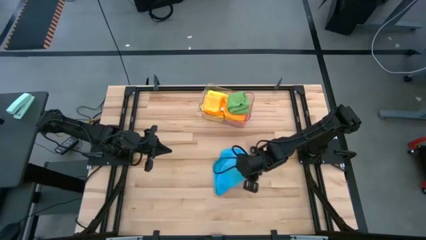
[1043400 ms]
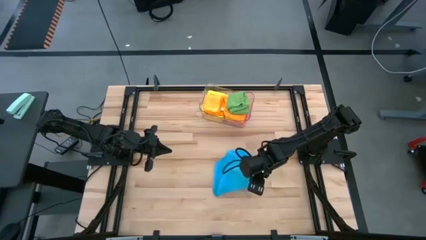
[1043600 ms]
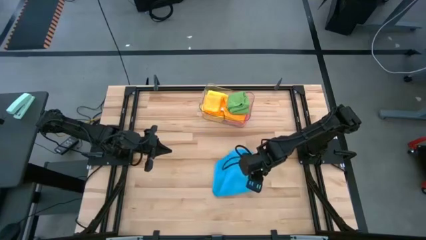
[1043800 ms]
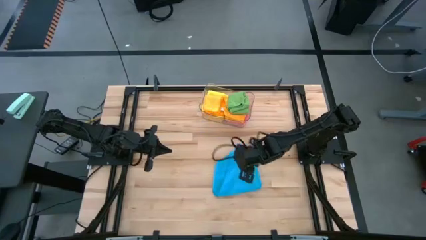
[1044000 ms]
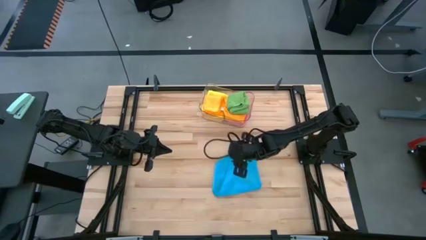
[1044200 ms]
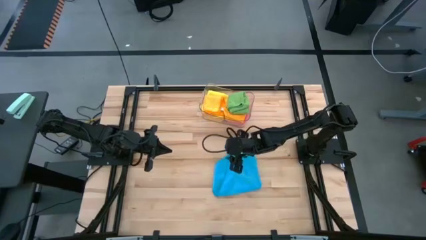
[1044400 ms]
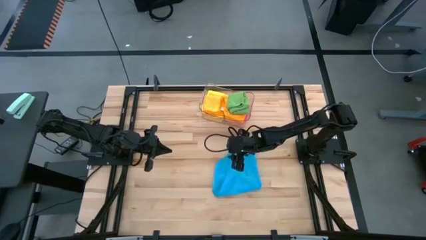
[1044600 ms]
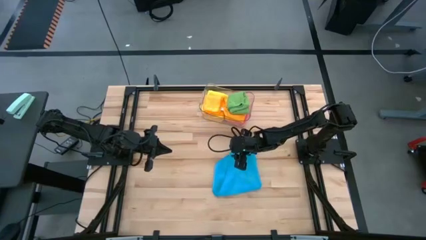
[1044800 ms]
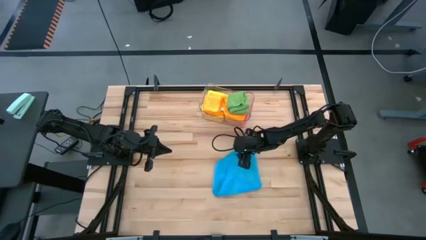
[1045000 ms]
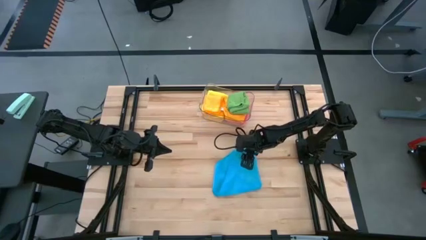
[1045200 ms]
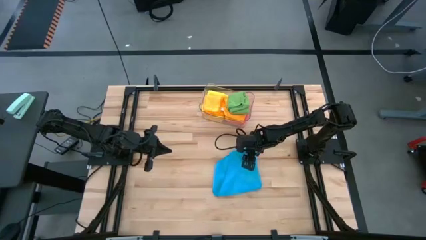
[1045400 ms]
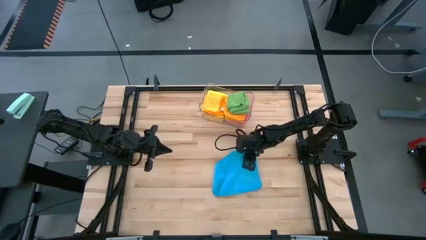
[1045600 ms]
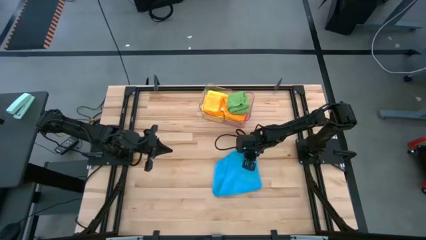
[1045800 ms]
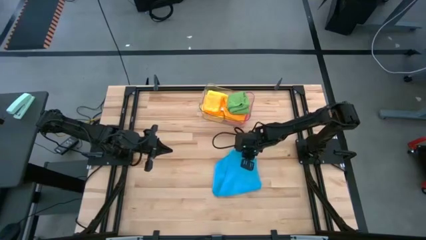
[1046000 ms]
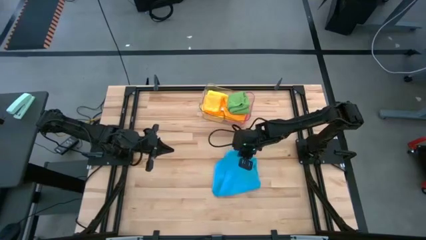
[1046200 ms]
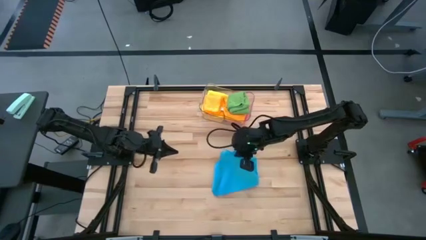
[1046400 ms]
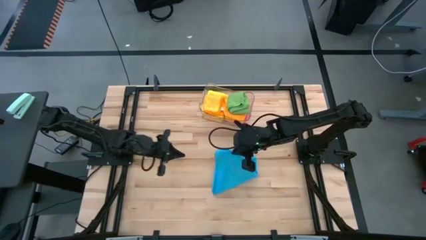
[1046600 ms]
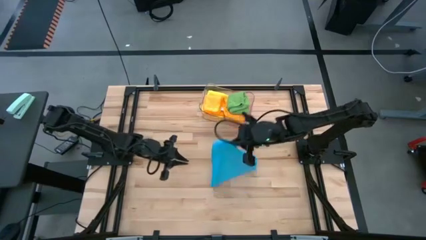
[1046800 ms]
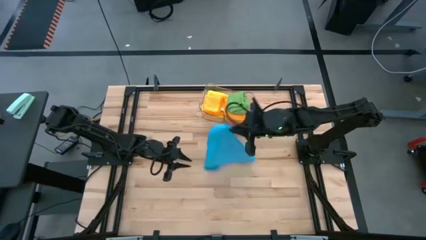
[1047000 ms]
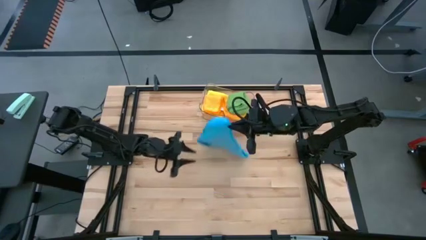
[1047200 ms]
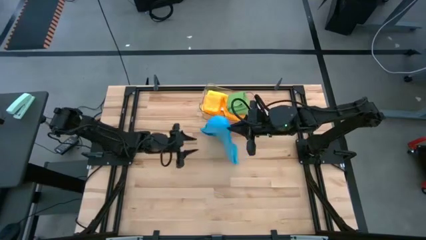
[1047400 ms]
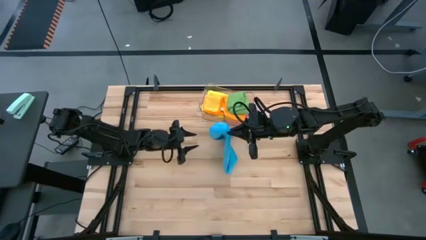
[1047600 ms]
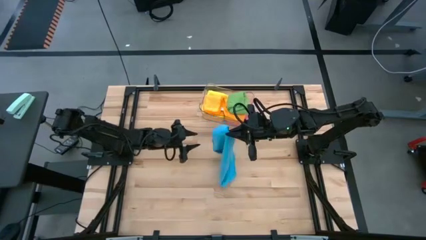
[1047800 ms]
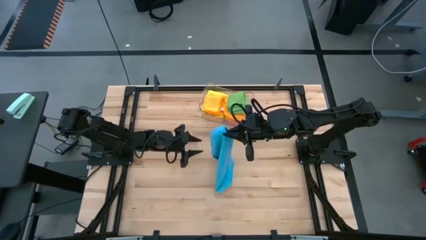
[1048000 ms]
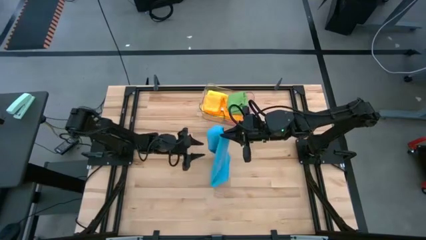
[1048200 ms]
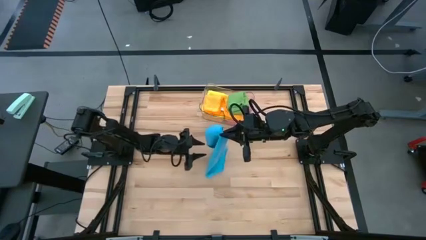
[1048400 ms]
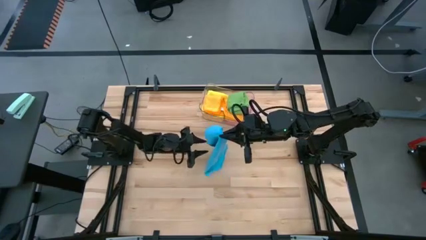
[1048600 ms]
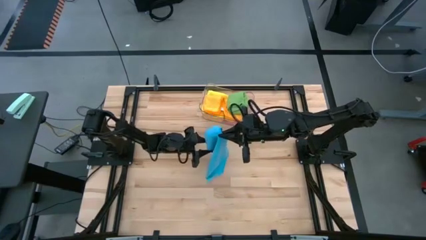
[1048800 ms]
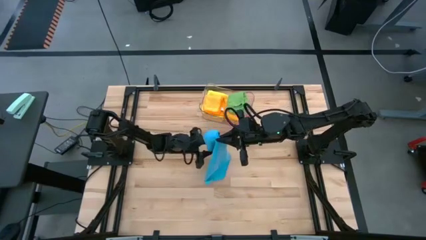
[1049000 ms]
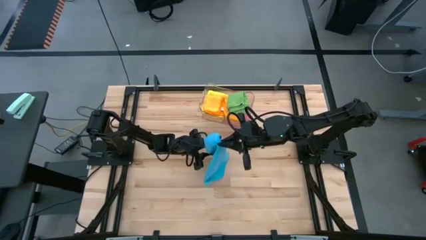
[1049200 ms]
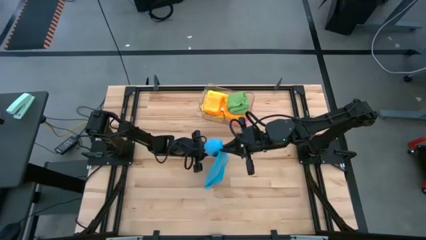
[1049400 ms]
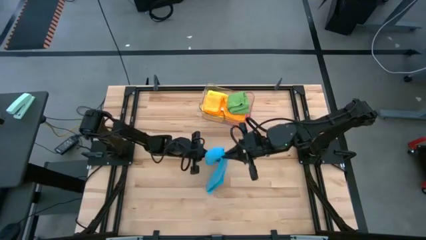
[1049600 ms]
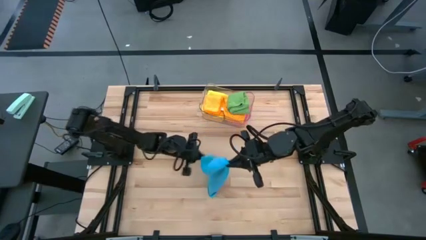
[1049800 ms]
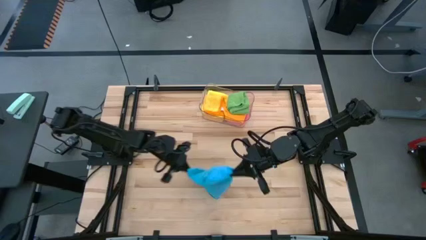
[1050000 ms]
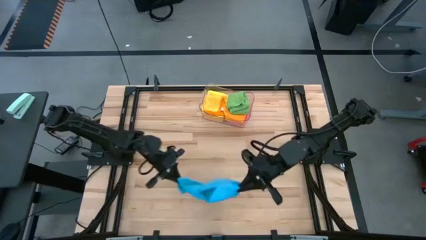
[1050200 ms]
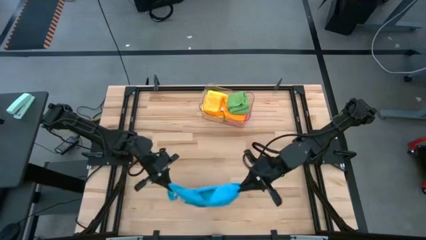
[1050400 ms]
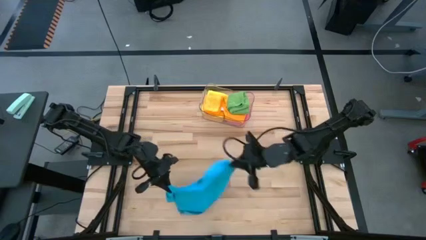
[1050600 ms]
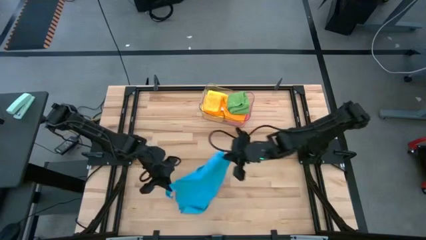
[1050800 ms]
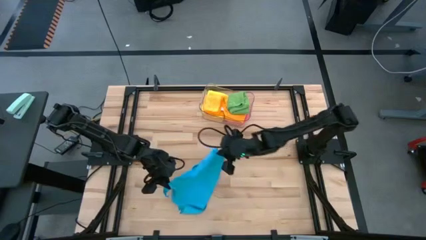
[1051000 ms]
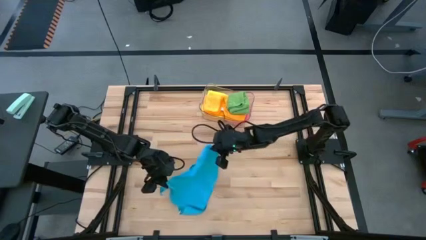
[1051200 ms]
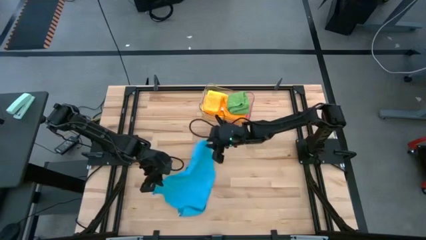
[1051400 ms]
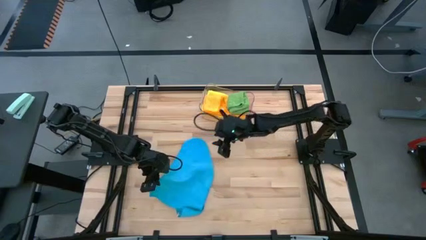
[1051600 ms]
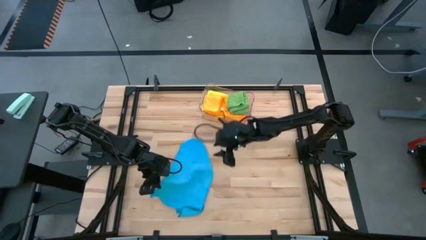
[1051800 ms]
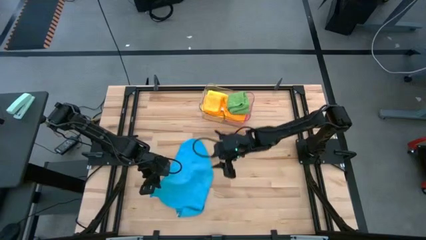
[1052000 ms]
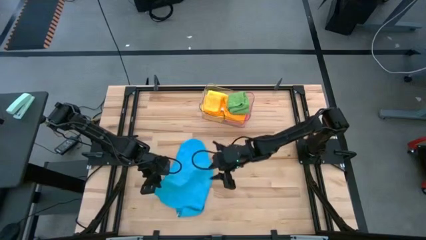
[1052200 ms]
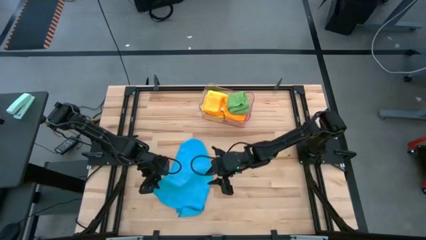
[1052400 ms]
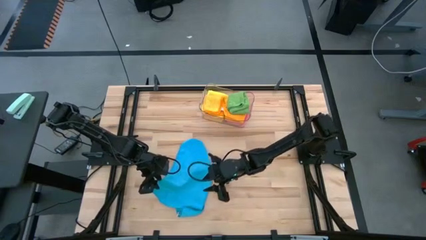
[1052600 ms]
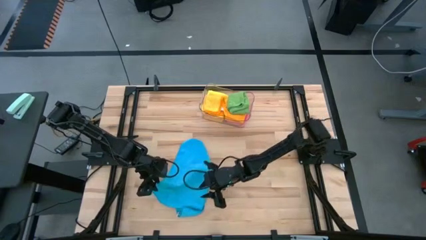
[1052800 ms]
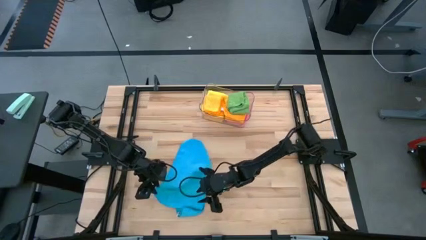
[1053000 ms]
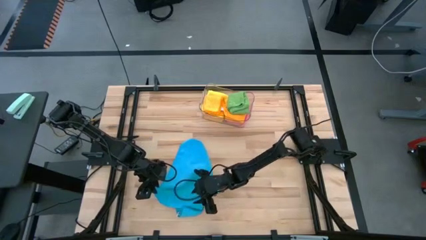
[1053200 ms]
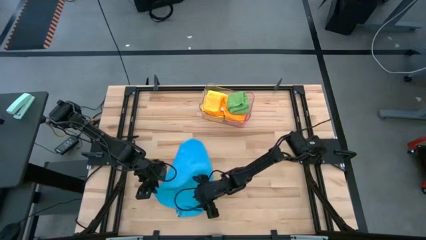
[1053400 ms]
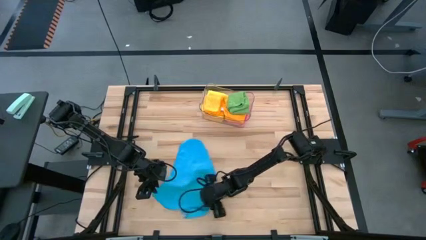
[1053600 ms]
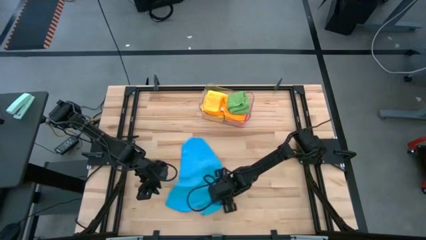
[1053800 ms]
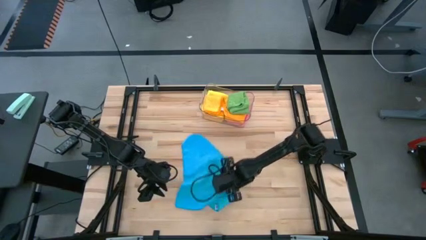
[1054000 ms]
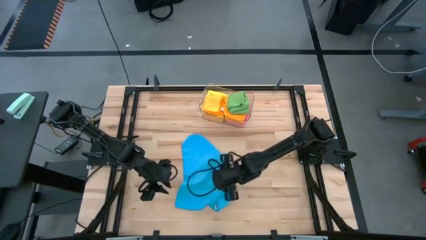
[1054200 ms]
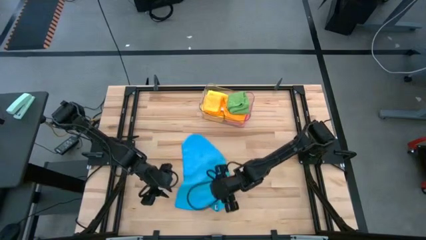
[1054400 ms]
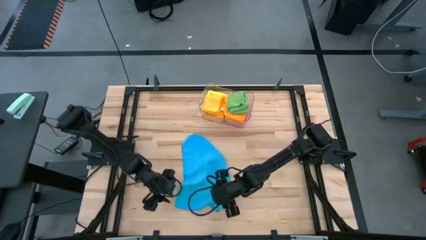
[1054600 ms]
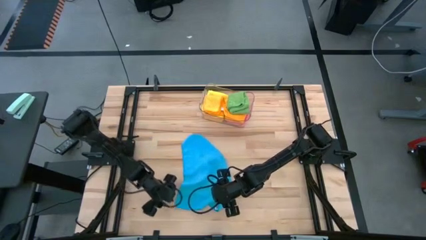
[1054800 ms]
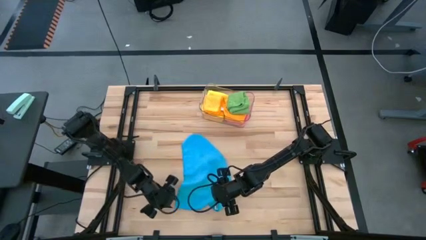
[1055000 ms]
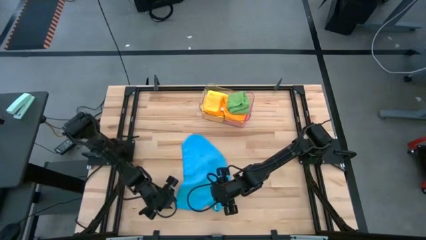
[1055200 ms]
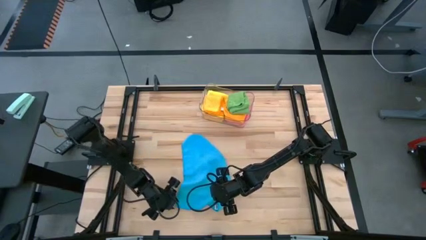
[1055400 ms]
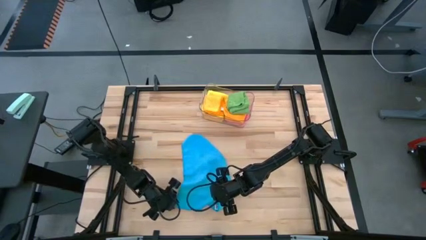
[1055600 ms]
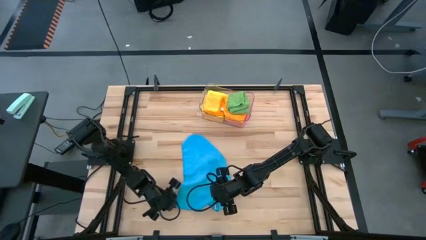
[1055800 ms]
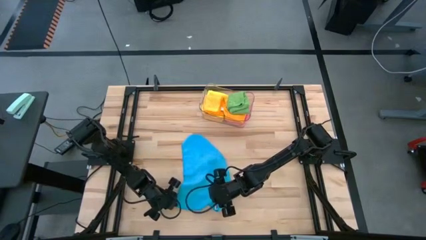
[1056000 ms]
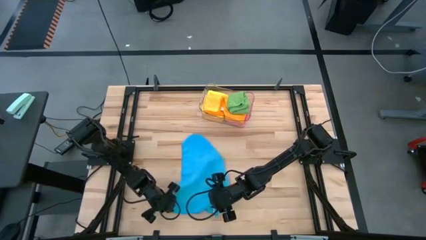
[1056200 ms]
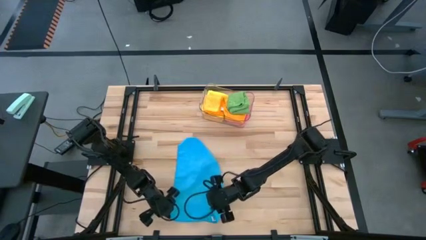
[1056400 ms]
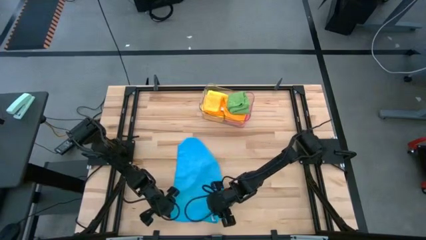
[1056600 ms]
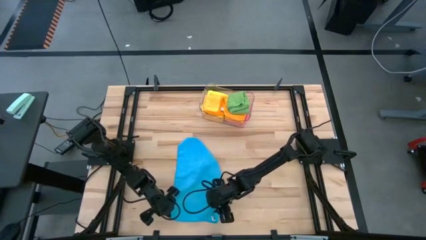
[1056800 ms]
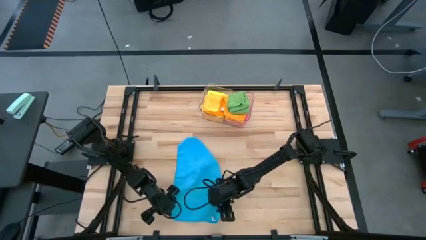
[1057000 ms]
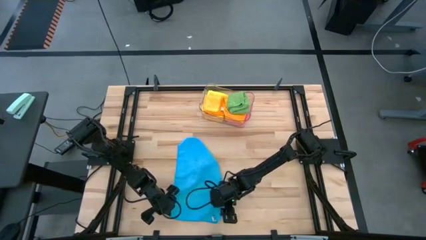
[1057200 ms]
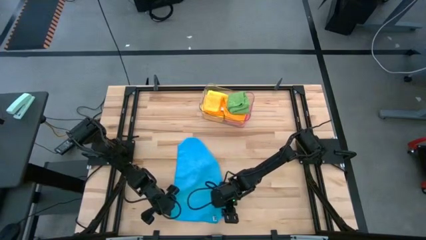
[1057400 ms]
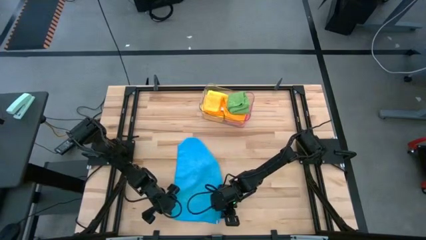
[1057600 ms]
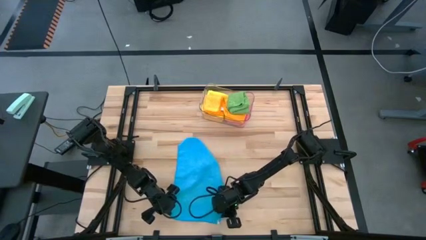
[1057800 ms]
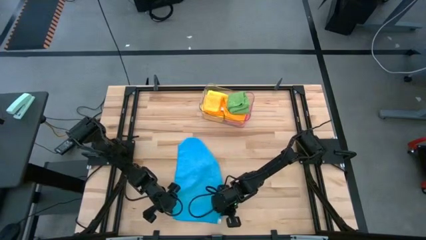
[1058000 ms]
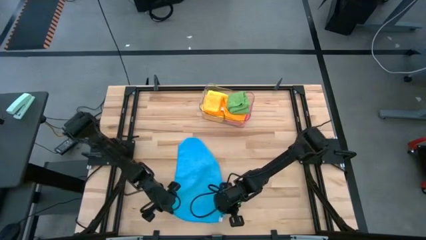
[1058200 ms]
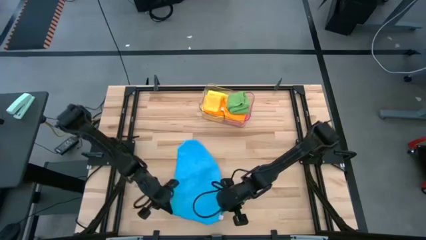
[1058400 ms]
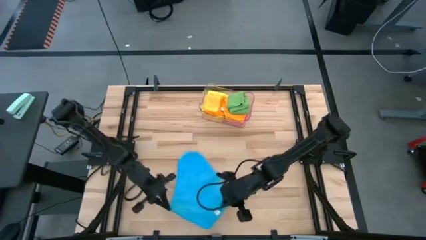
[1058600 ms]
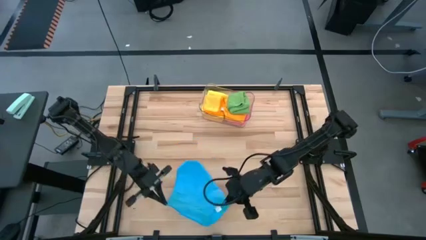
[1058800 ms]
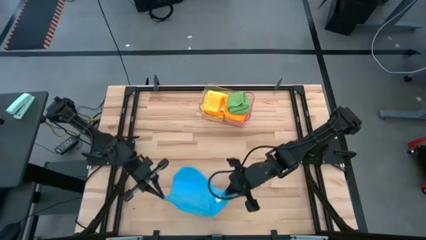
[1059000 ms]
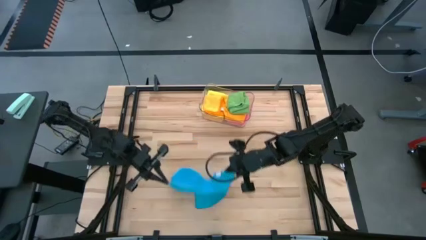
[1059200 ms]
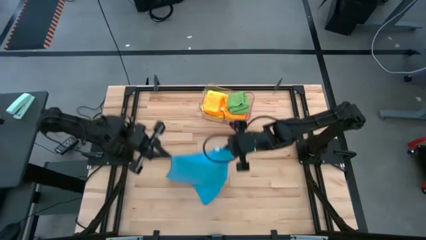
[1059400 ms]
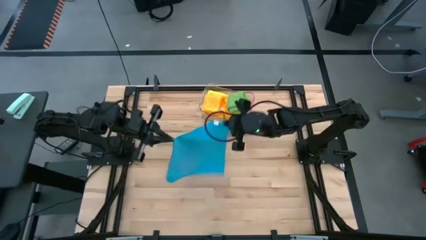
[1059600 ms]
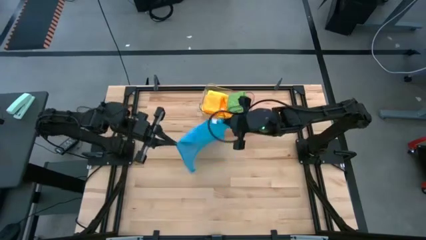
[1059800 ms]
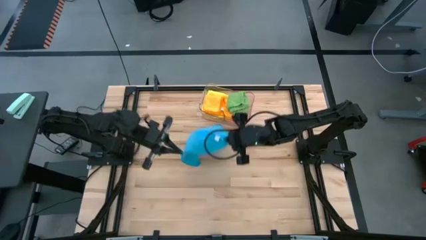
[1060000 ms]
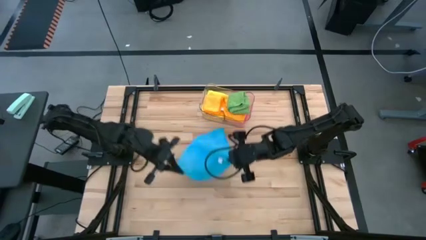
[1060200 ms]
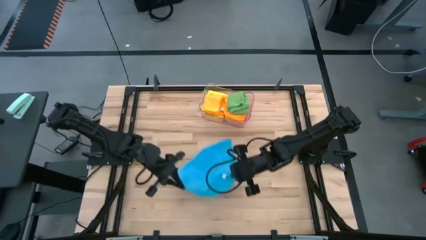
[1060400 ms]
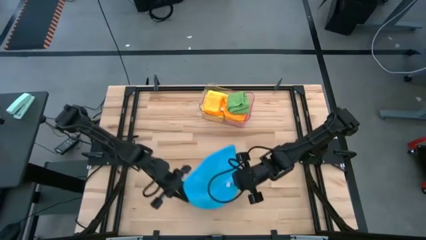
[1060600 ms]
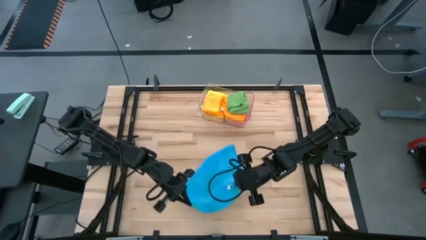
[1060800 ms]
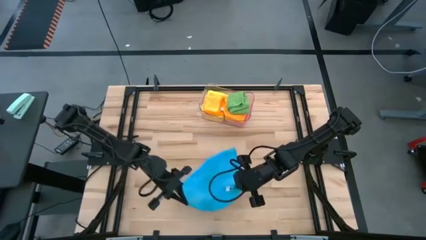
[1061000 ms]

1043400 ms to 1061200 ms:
Task: Fold microfiber towels
Fold the blue microfiber cloth
